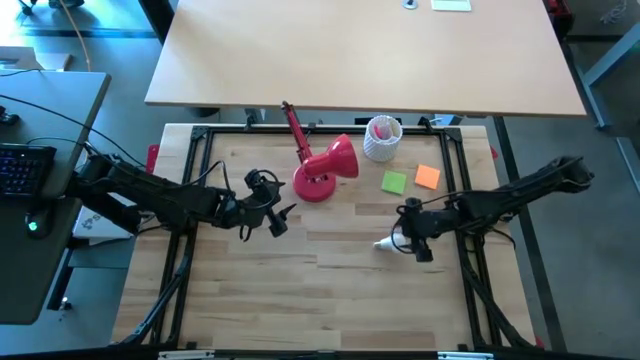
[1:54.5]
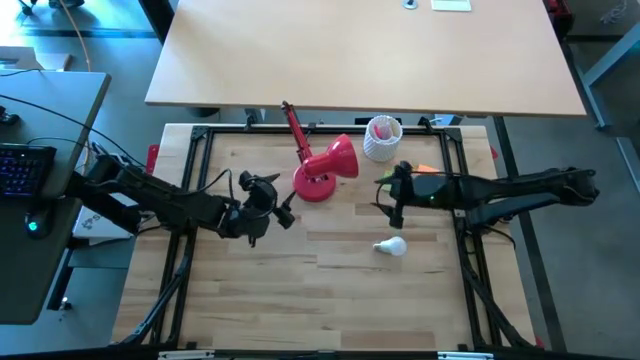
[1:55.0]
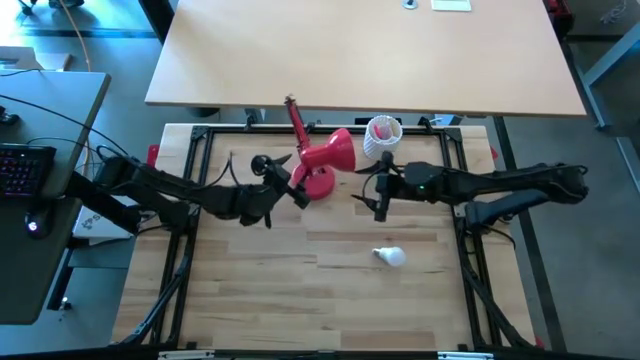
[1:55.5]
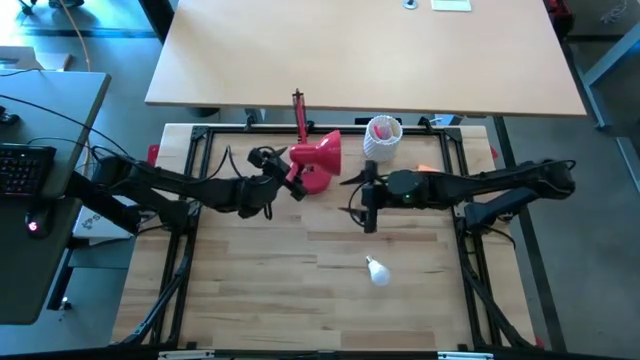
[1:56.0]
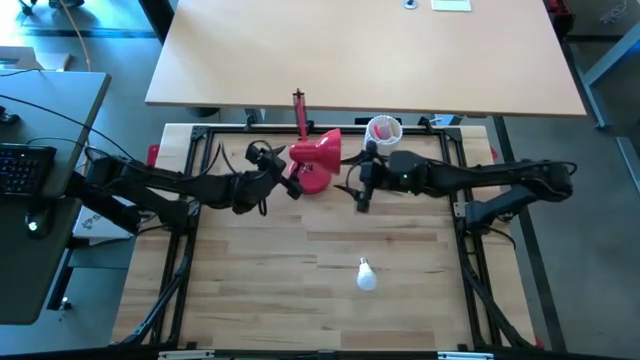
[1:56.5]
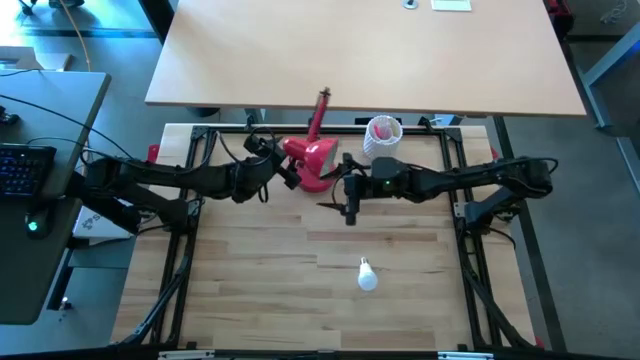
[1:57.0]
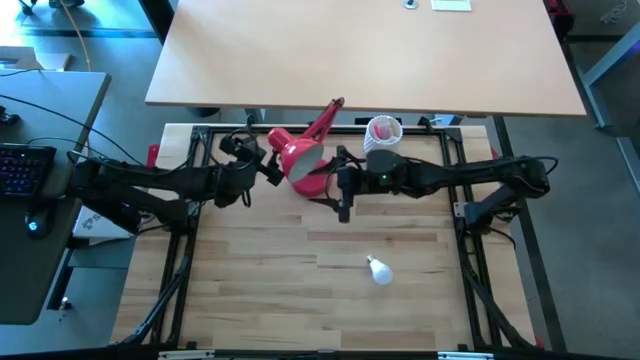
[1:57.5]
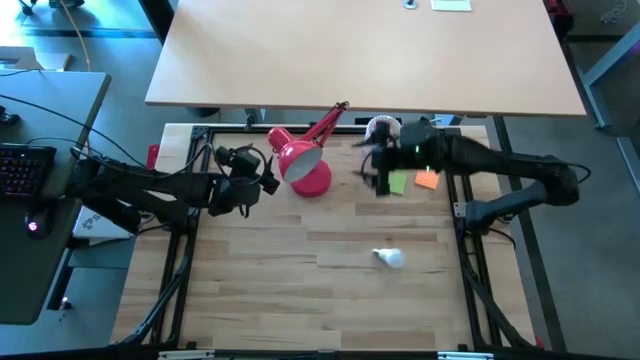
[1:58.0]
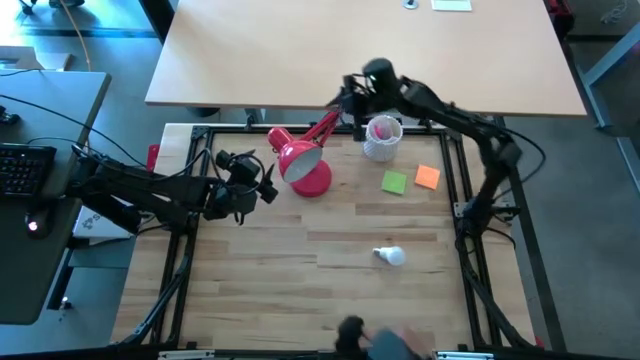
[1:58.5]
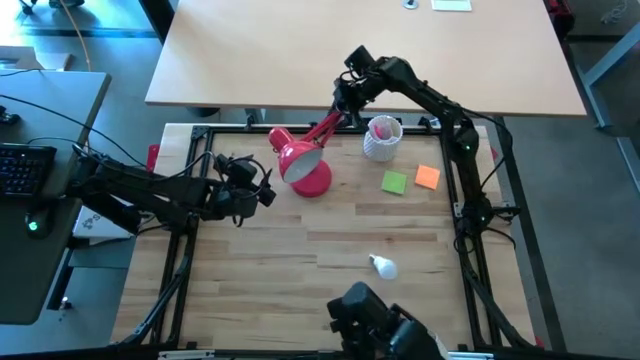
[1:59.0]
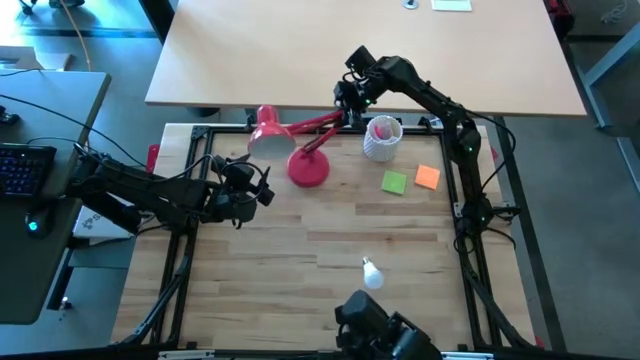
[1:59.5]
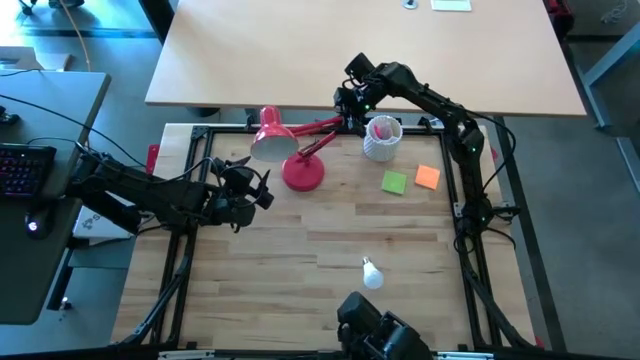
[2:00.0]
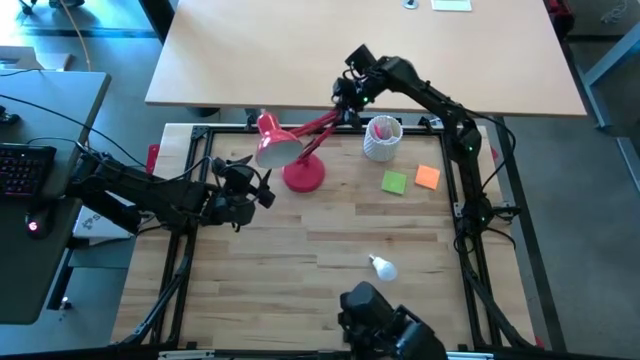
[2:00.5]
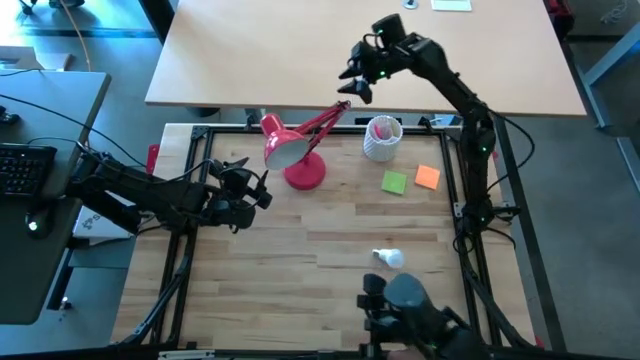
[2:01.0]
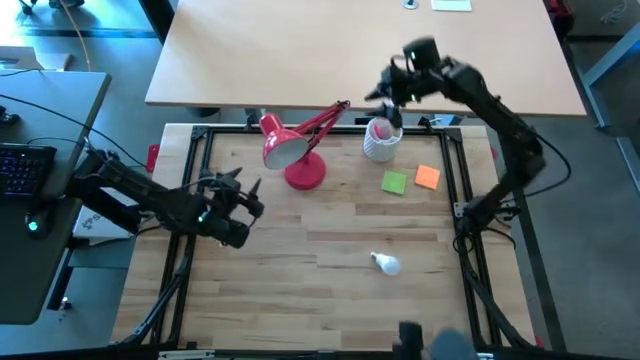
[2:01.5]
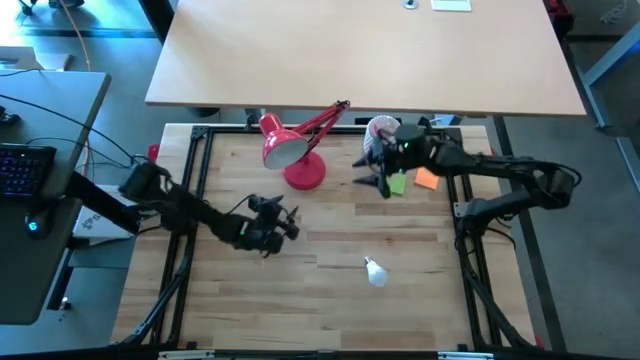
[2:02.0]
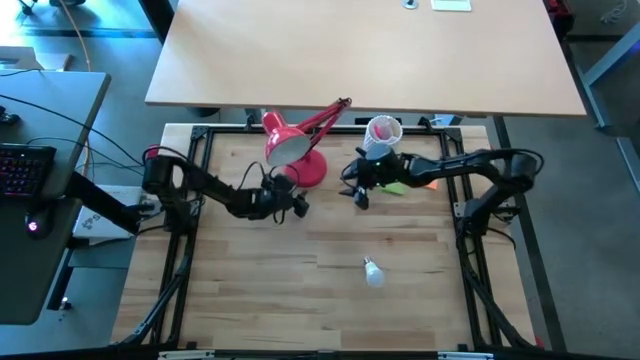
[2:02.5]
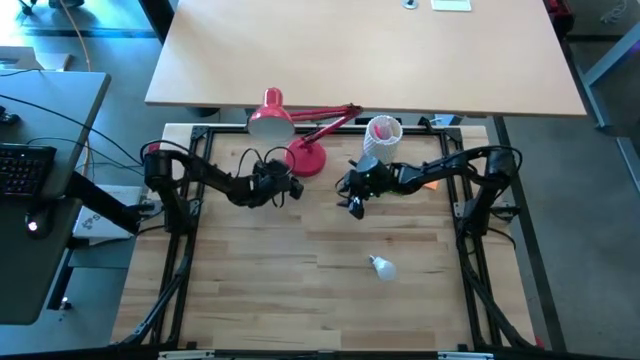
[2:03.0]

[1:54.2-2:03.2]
Task: Screw lightbulb
Move the red lamp beside the white pen organizer

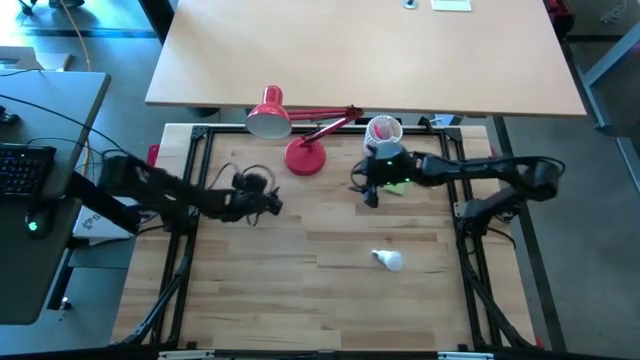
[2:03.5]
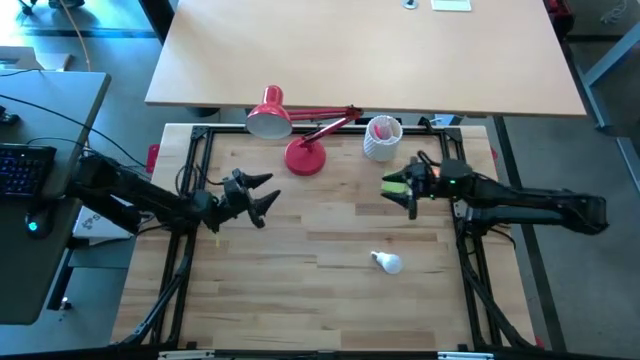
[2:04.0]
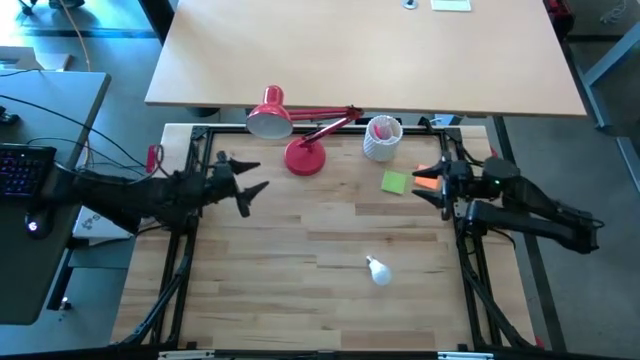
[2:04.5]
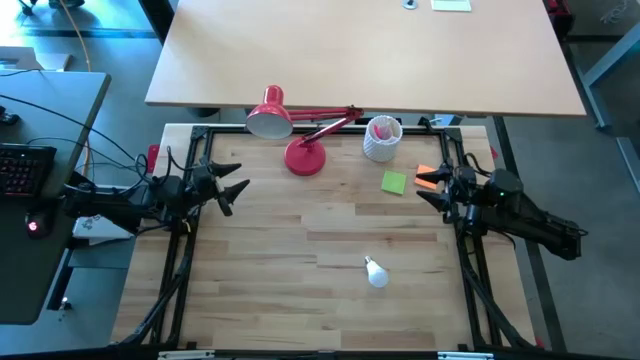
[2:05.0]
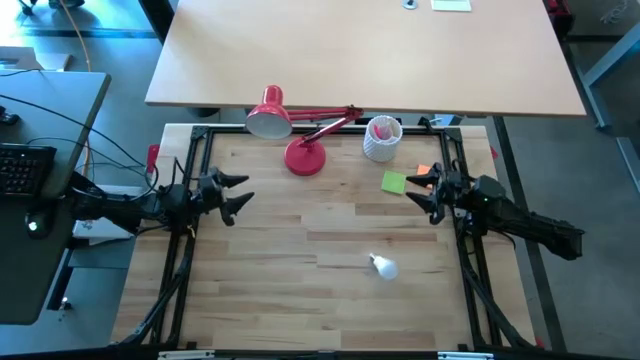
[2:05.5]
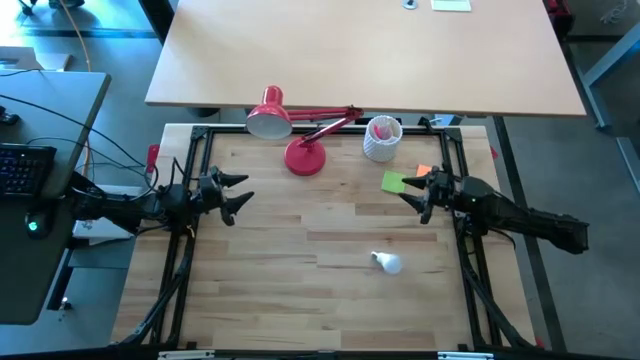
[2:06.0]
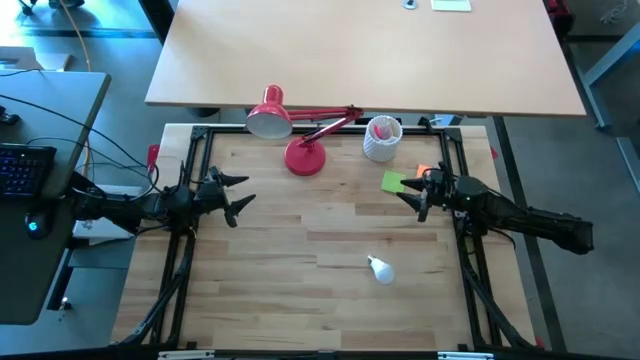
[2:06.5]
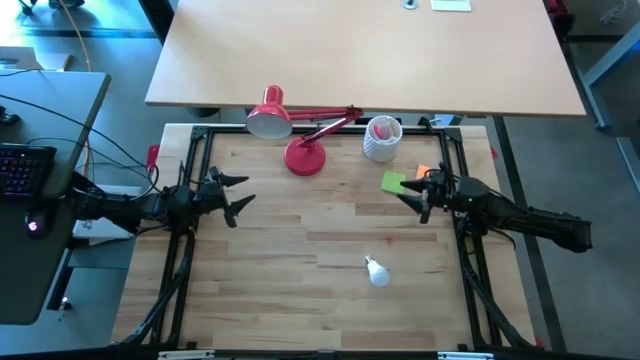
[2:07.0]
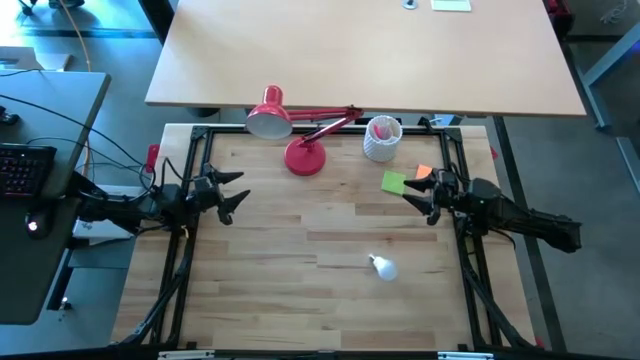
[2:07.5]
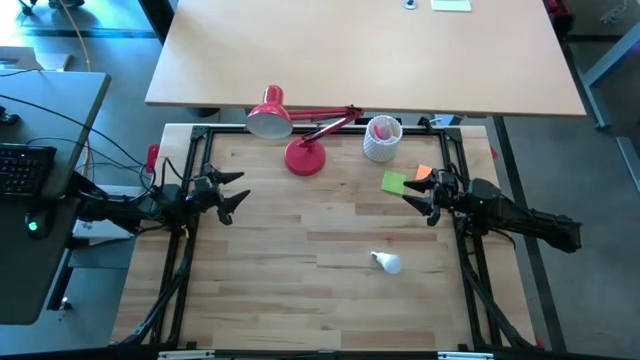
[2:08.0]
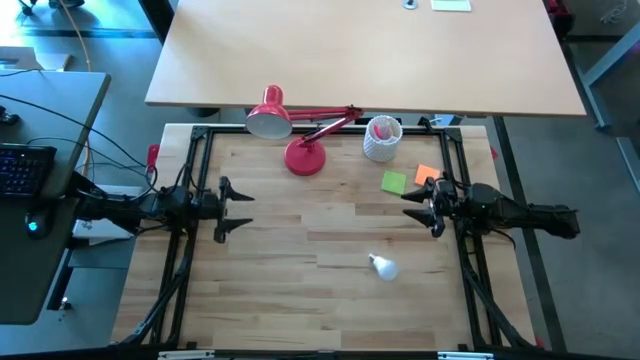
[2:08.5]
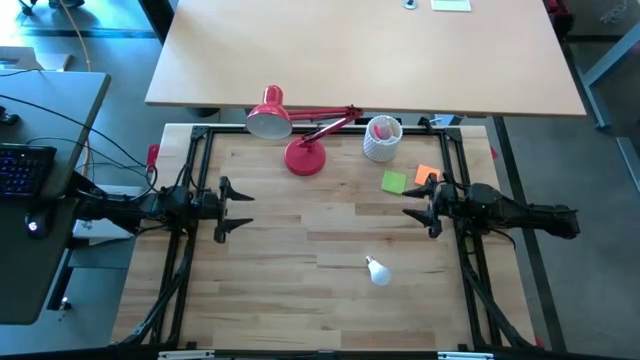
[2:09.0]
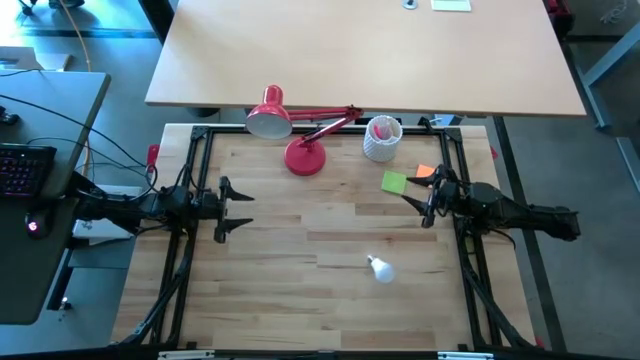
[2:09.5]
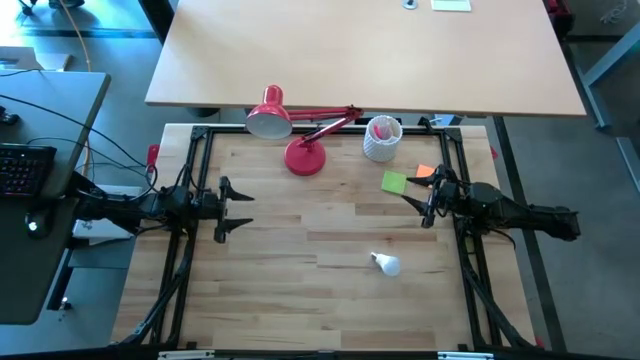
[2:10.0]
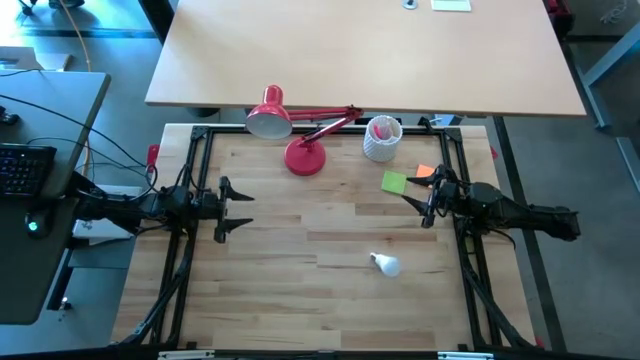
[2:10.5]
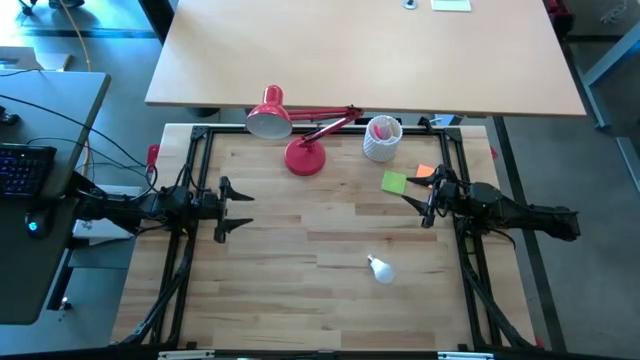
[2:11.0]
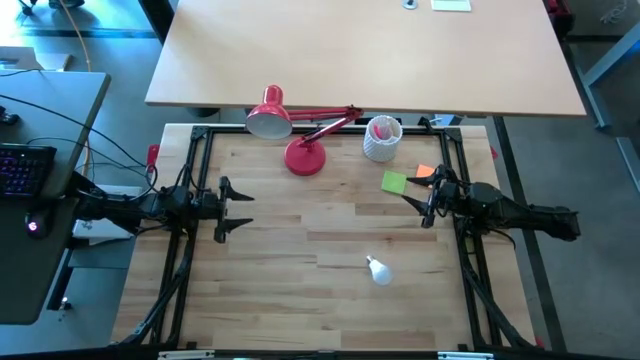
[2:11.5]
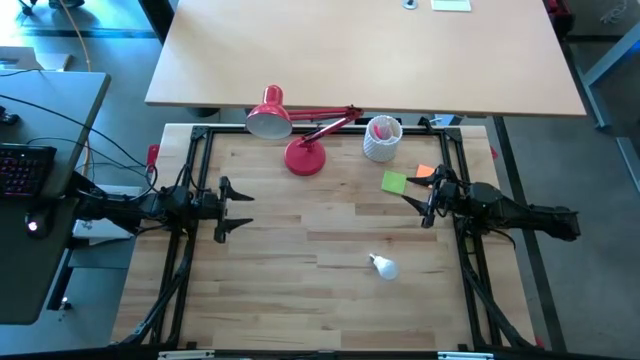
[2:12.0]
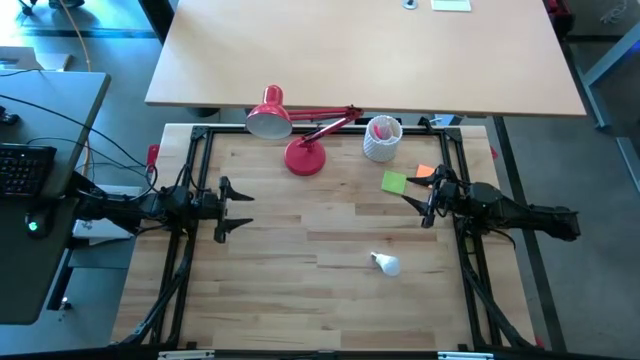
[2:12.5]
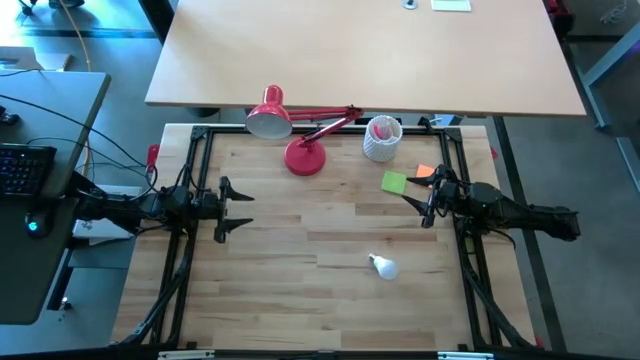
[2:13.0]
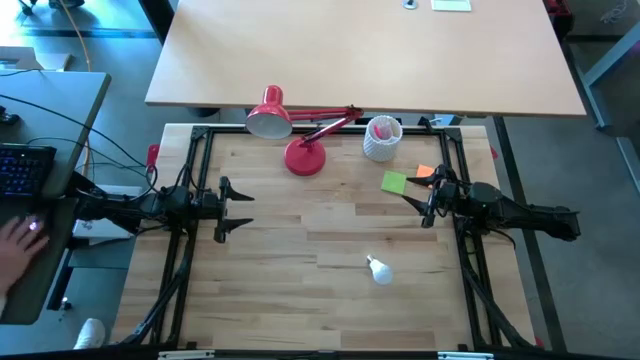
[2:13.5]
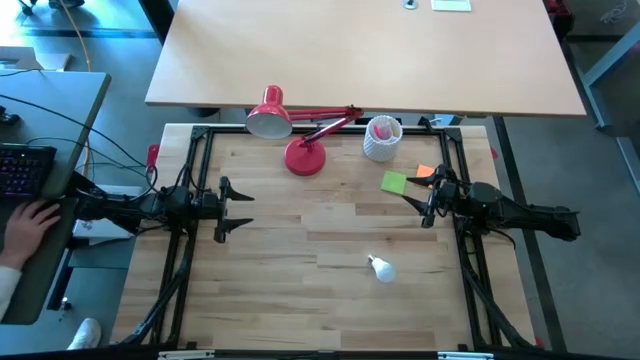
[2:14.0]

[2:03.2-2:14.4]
Return to Home Position

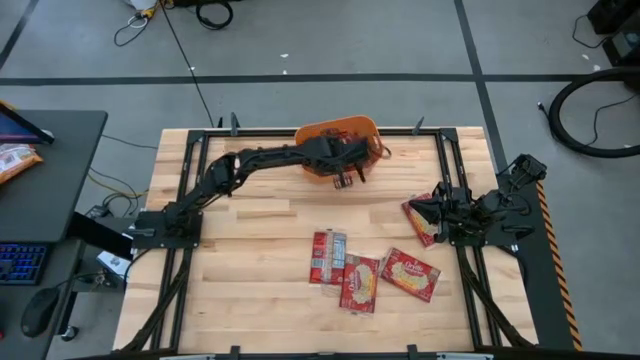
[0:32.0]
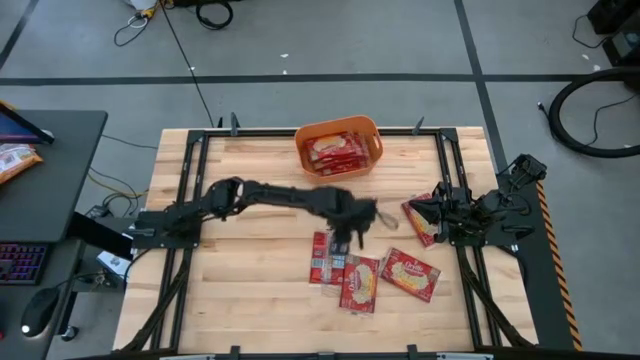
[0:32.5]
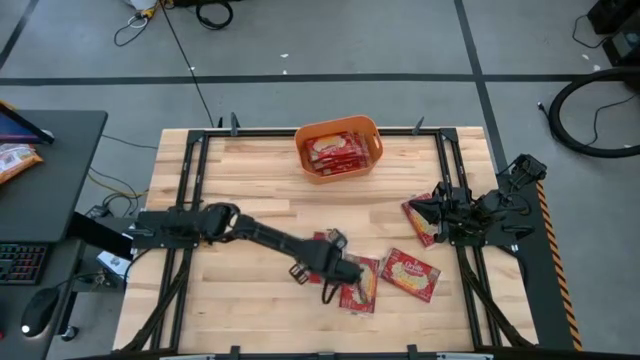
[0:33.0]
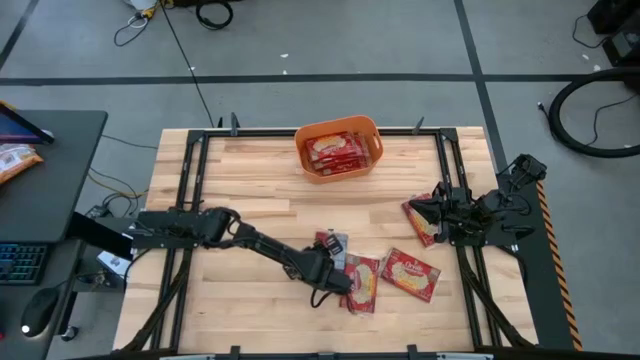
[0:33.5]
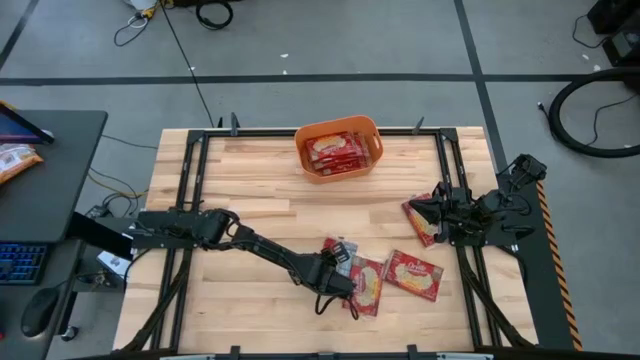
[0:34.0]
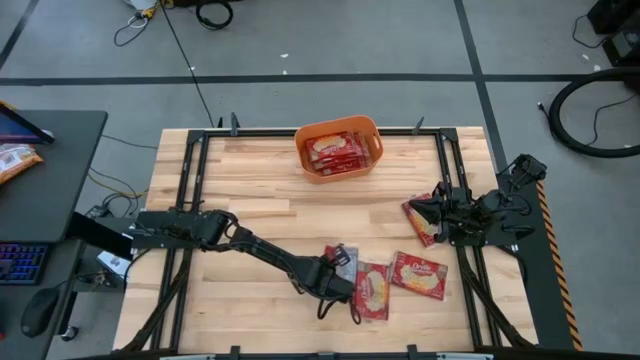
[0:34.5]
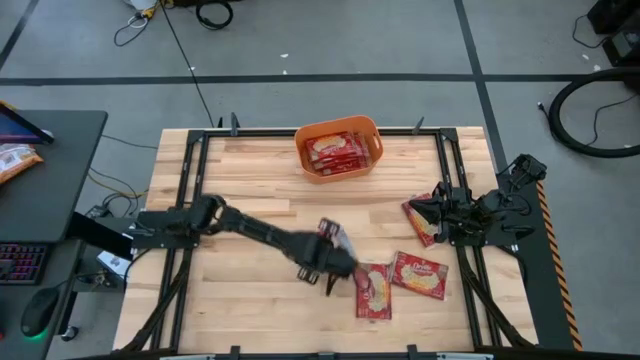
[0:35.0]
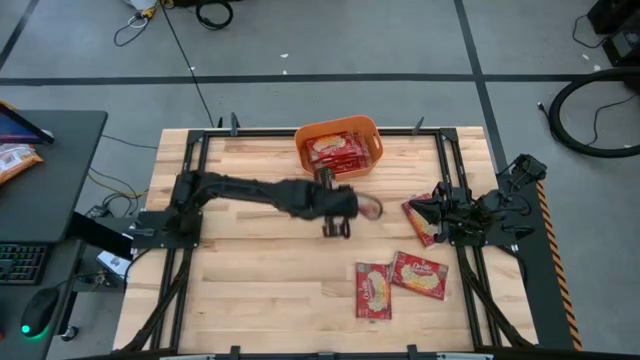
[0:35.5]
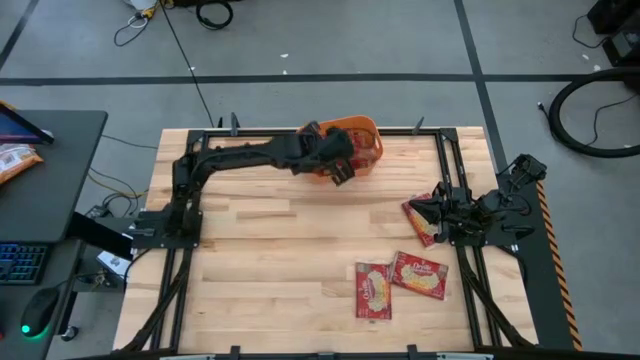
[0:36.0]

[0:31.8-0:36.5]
Task: Sort popcorn bags into baskets
Stack the popcorn bag on top of the stacked popcorn bag into the bin
